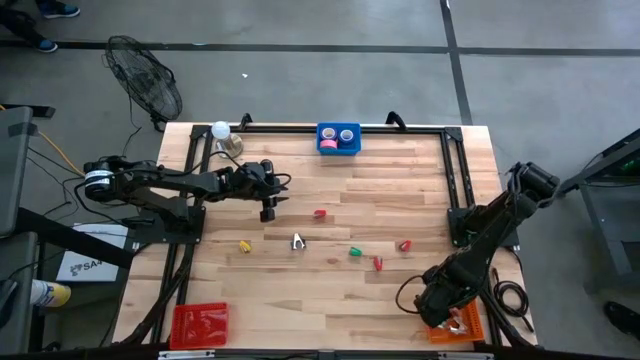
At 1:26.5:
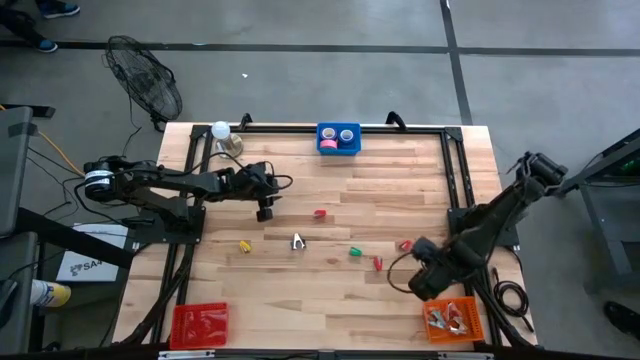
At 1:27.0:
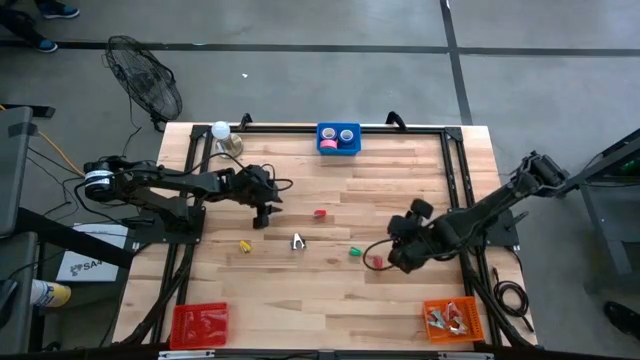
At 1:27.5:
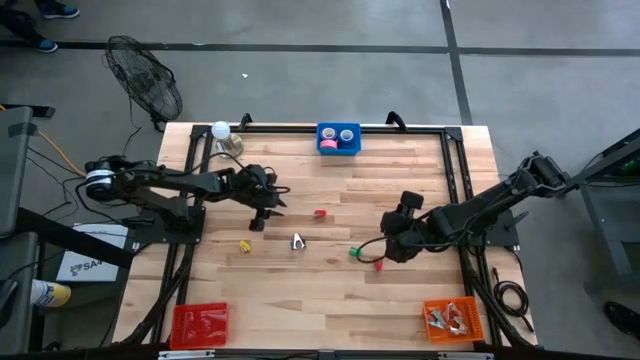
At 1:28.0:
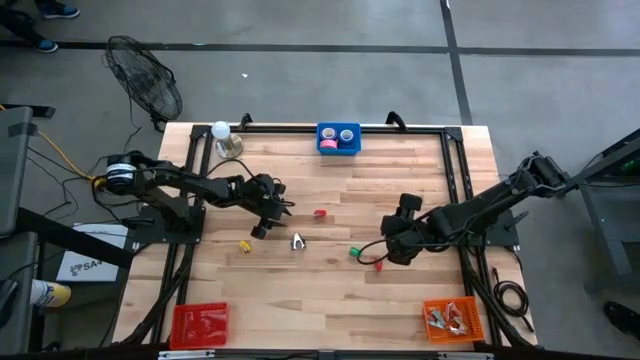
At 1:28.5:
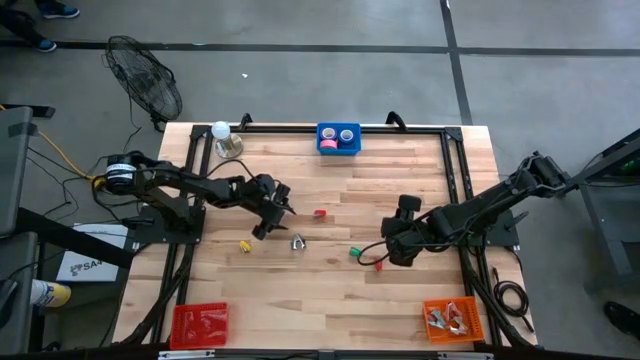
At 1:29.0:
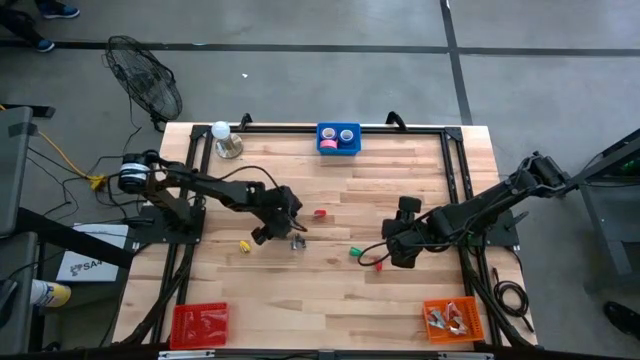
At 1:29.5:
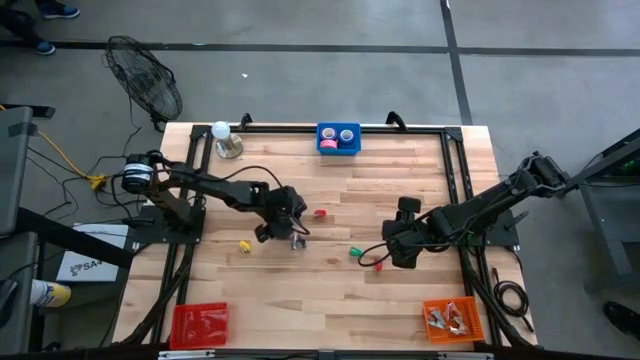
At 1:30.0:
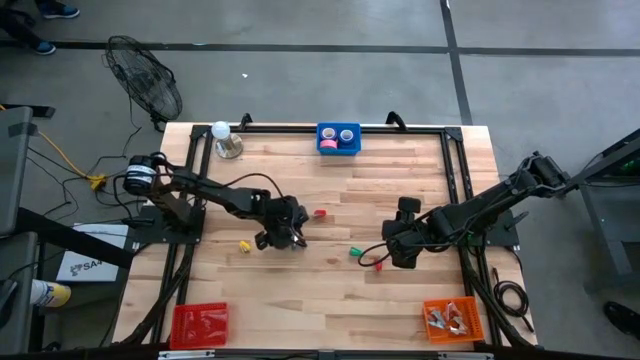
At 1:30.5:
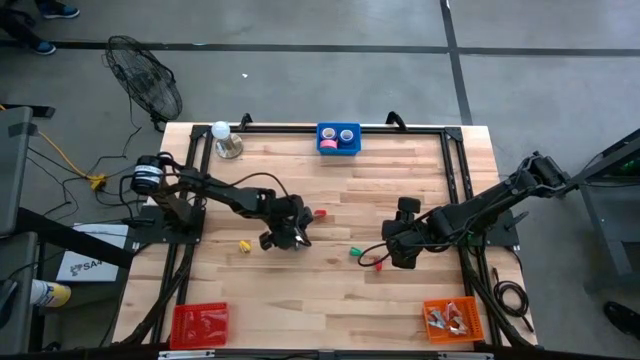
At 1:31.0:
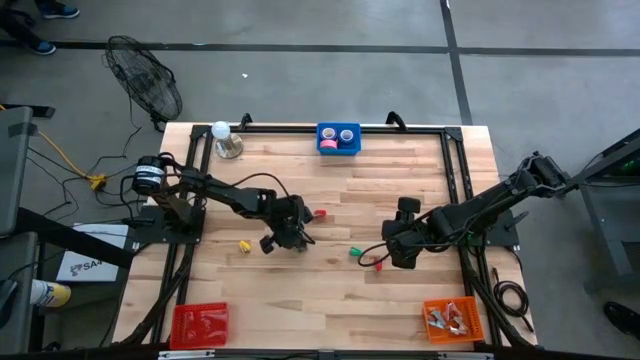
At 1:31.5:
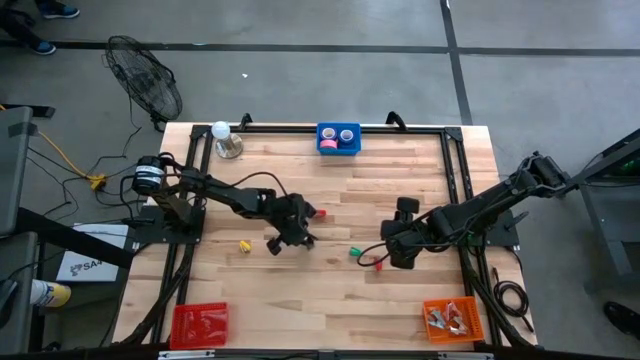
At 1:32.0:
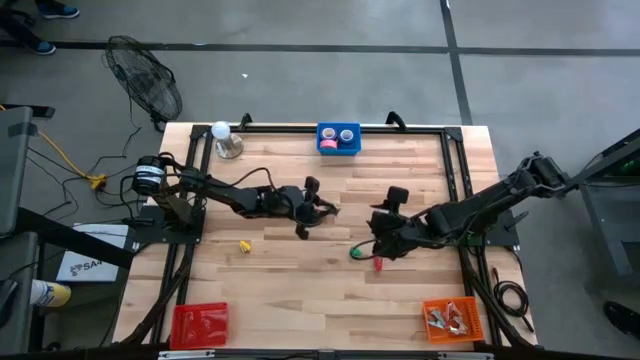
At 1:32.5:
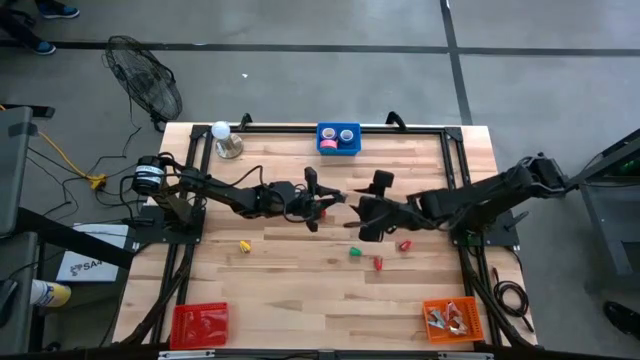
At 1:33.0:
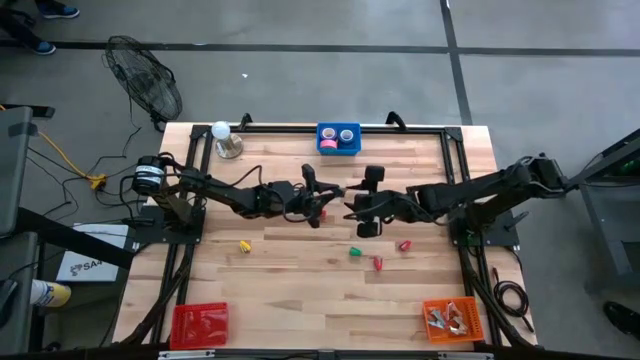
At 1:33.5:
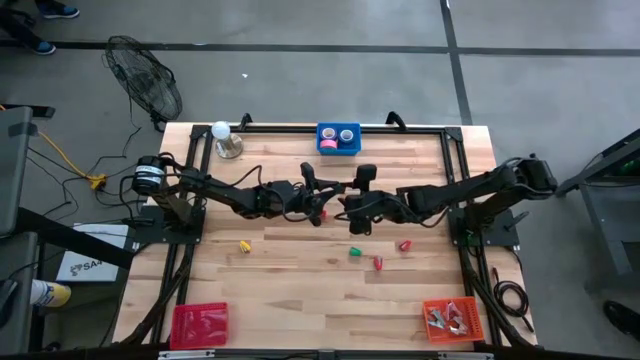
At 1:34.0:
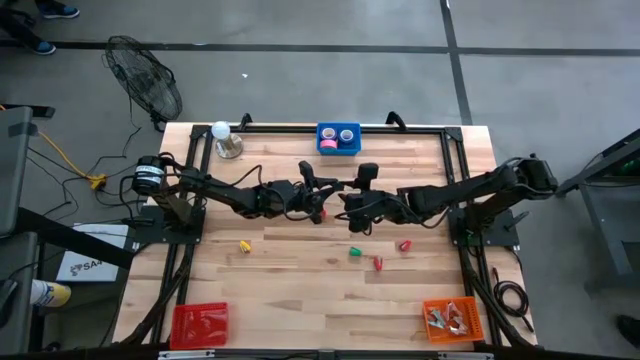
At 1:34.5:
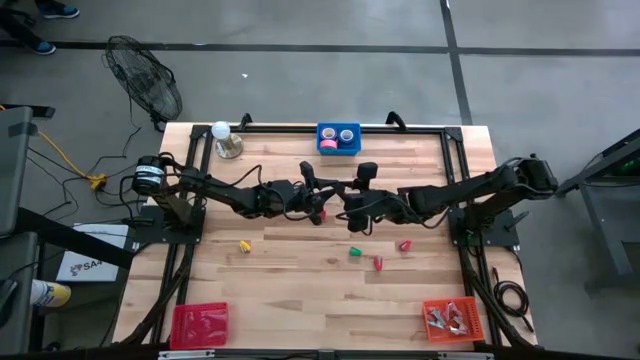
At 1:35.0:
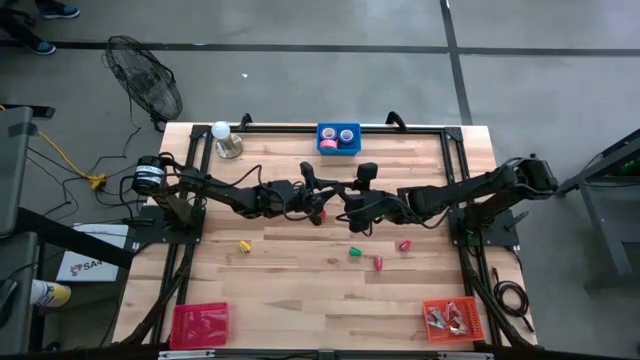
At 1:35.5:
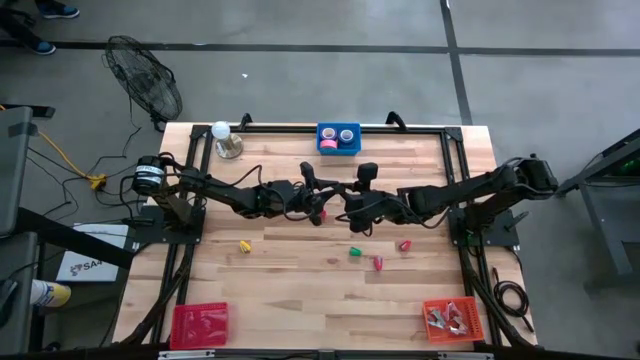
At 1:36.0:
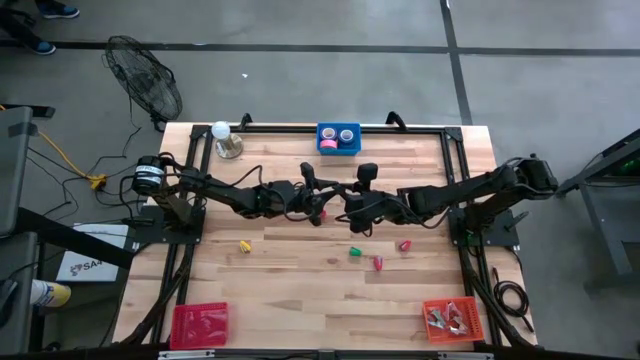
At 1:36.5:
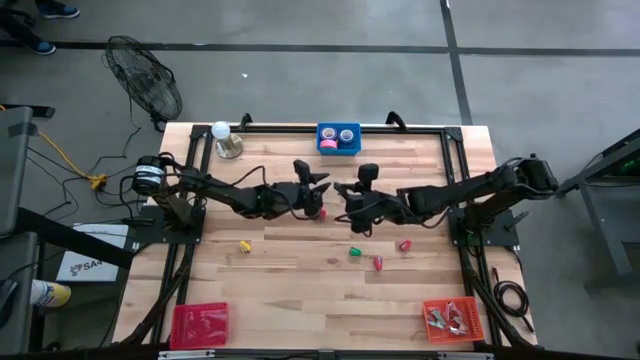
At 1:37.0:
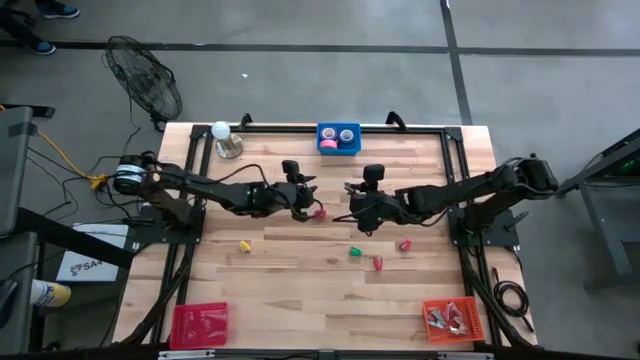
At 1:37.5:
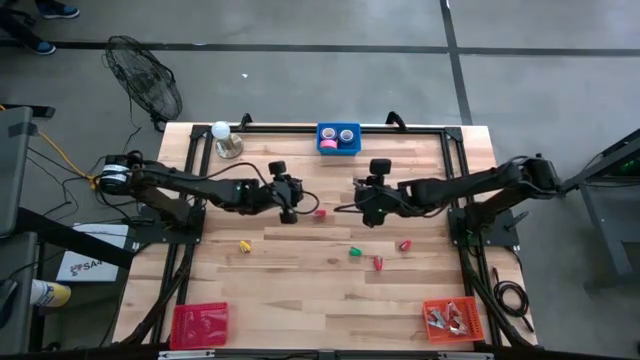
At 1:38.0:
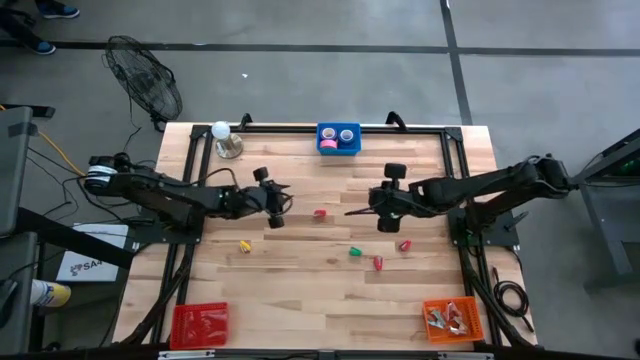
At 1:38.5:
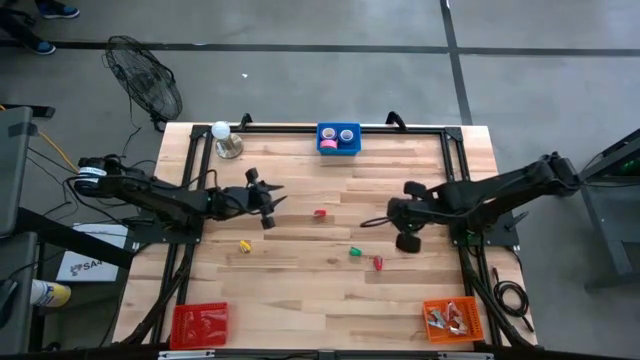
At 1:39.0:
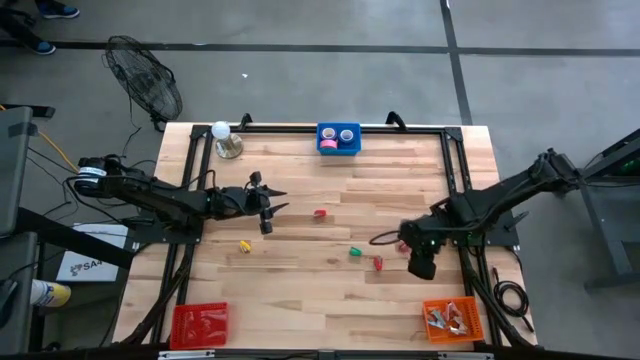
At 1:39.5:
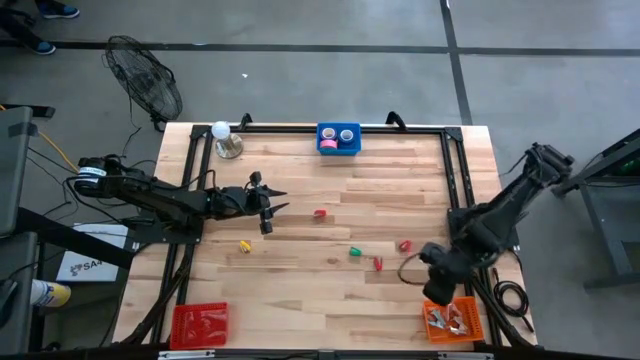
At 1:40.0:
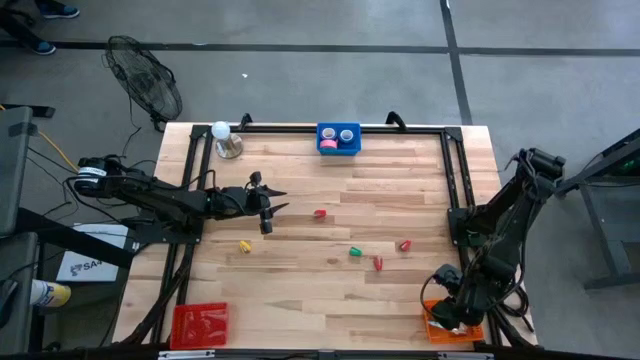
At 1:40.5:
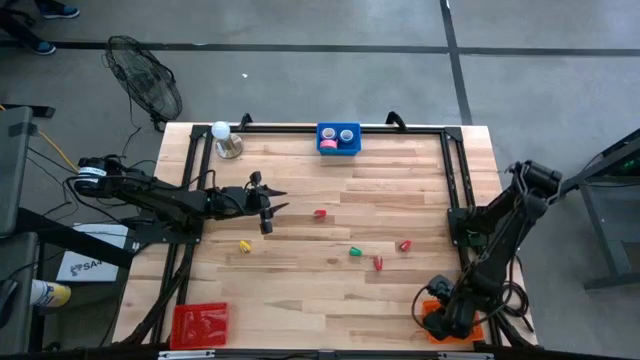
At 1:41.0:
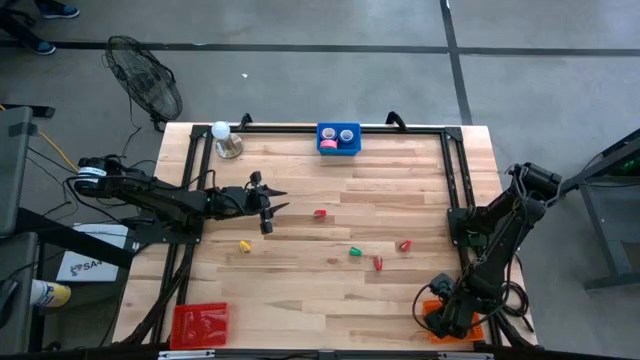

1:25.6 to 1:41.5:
Task: Pick and place Stapler, Stapler remover, tape
Put the black staple remover into the orange bin

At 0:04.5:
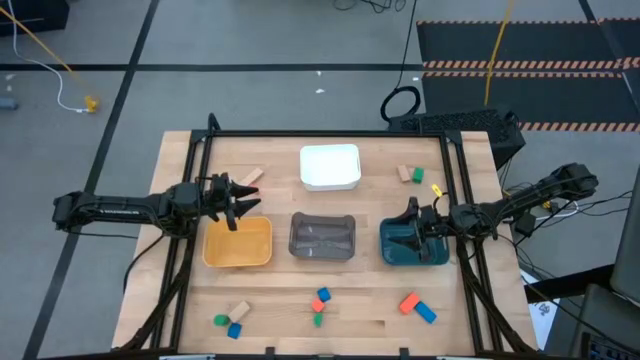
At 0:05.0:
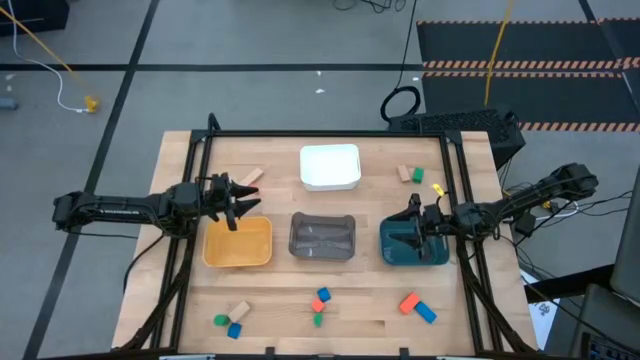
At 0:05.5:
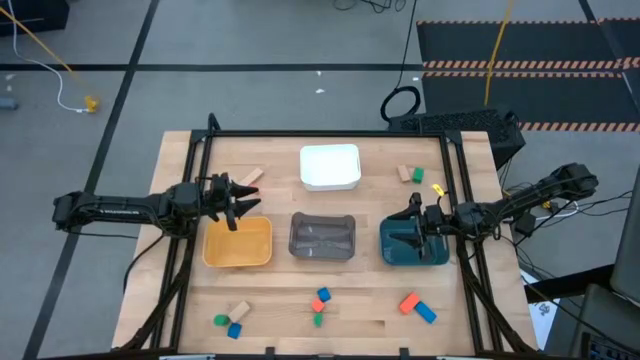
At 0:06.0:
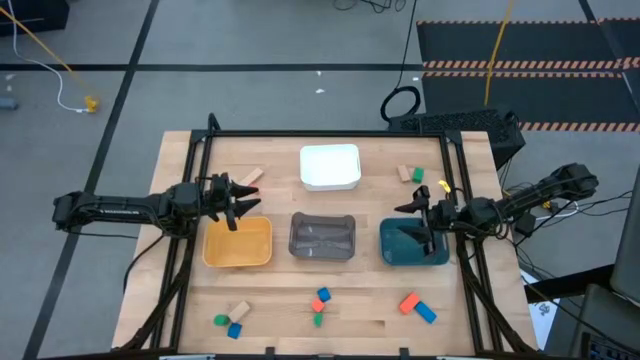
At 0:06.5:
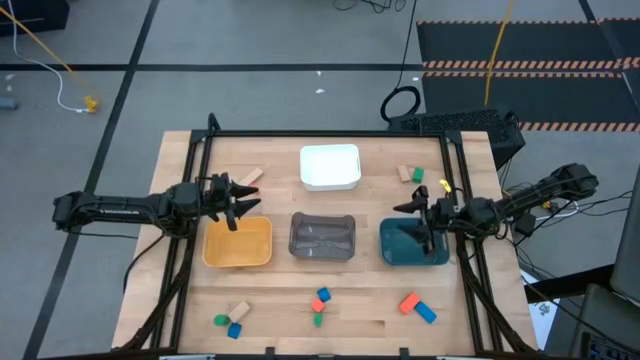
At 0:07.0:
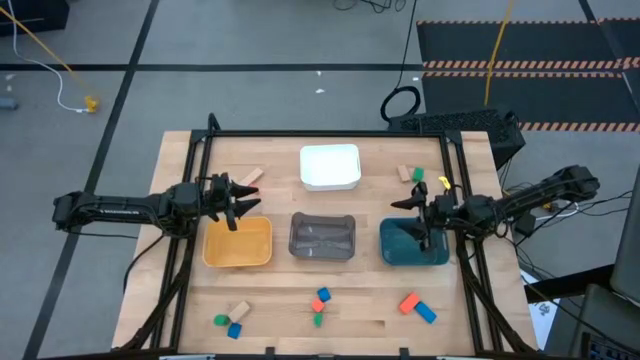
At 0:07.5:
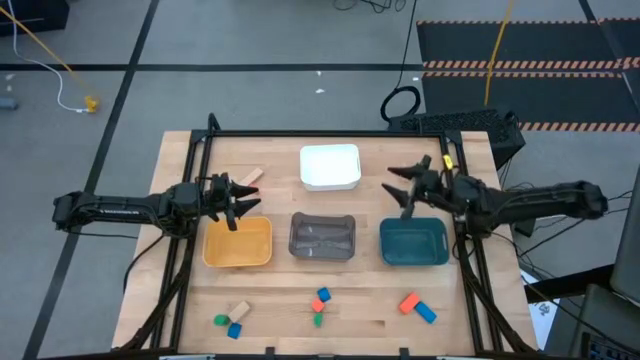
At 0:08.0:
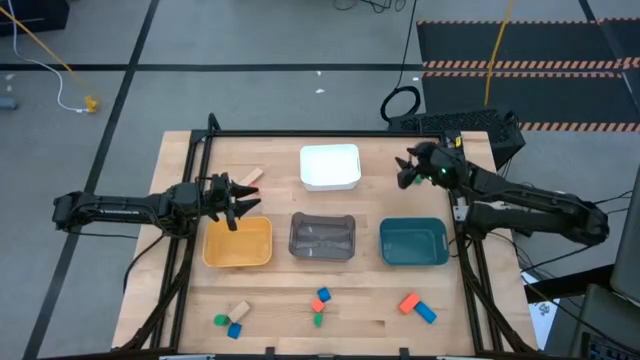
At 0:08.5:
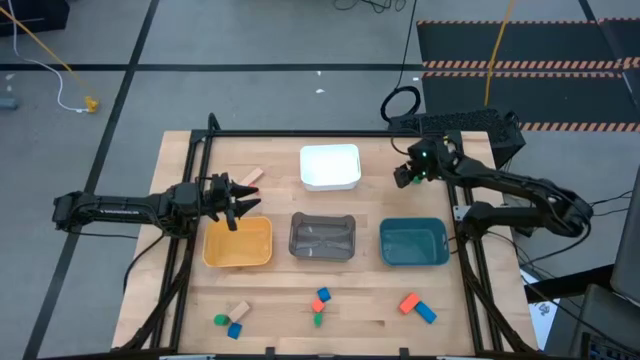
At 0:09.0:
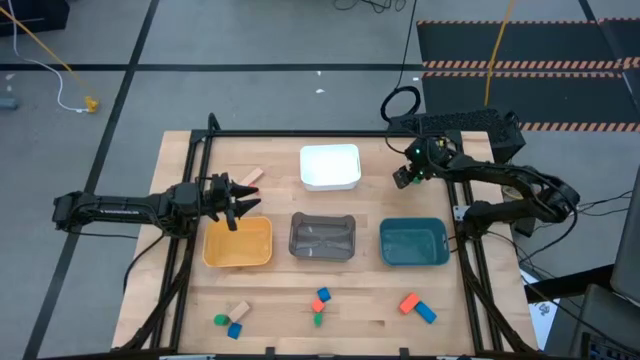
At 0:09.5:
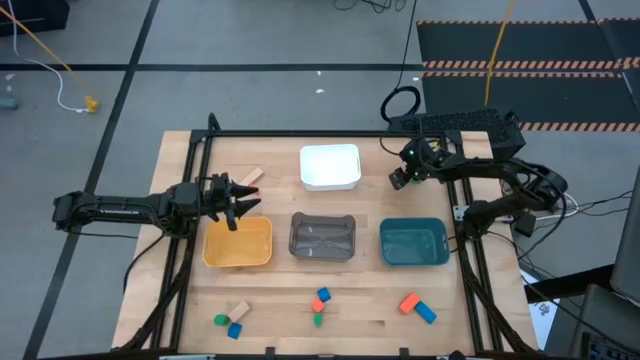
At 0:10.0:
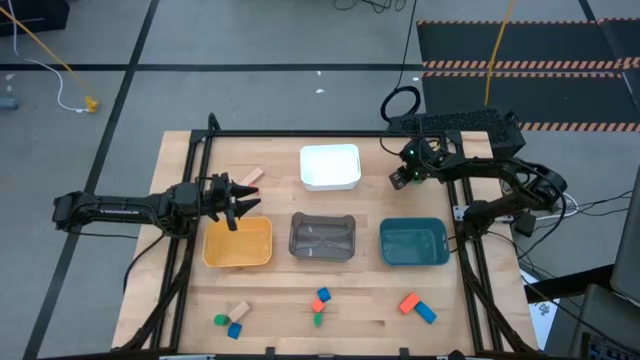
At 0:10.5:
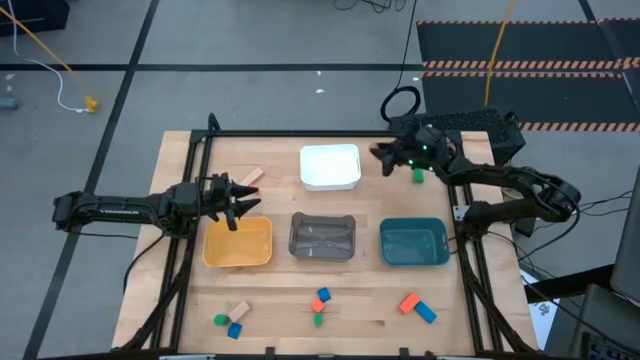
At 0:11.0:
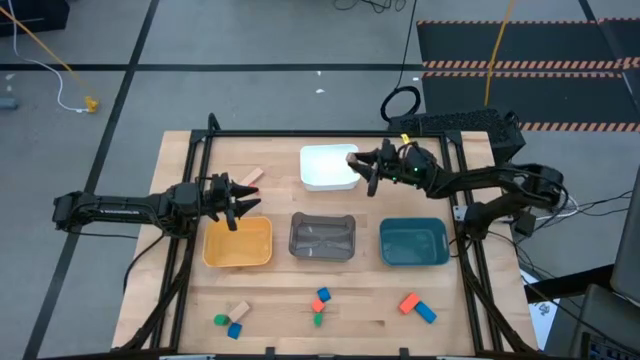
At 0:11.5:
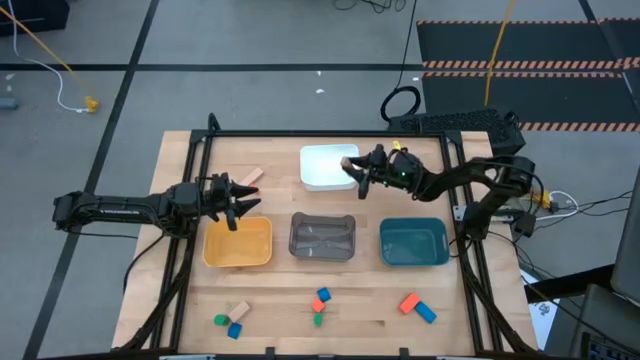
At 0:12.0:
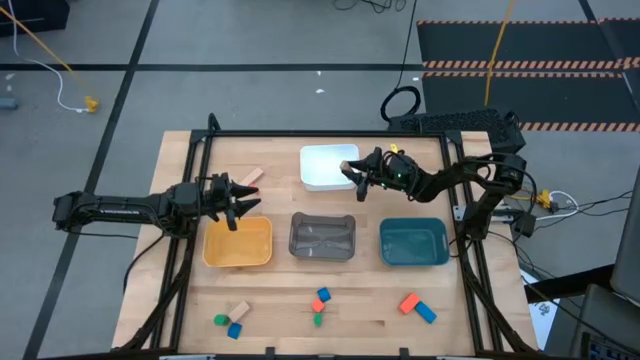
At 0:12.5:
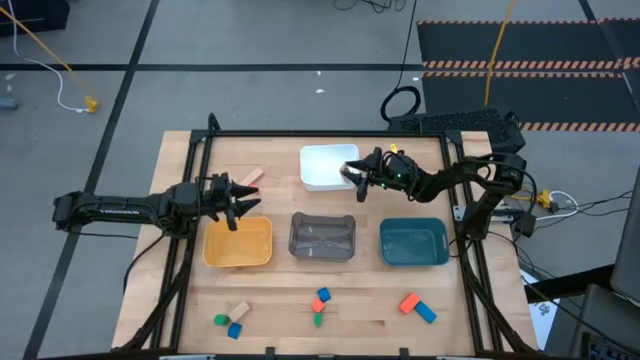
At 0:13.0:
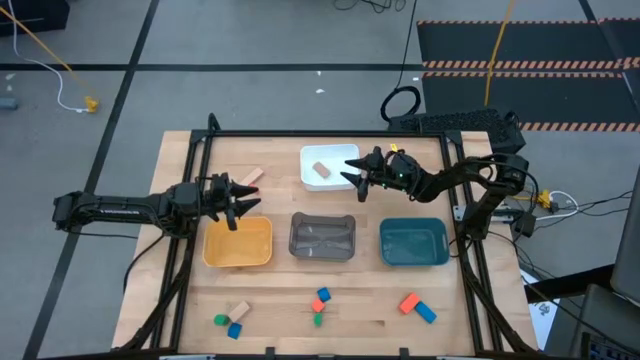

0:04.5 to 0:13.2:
Task: Sort & place blocks by color
Put the right small rectangular wooden block into the white bin
